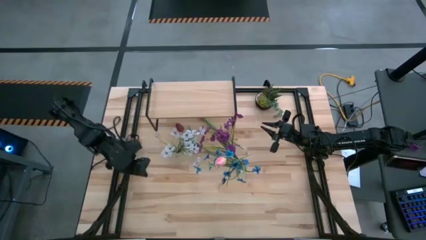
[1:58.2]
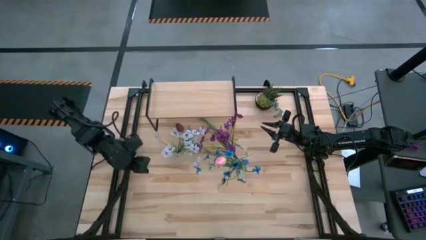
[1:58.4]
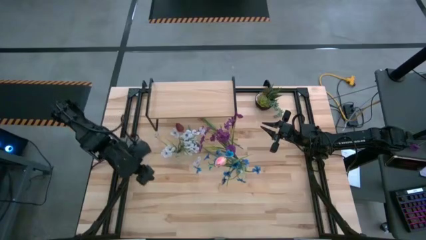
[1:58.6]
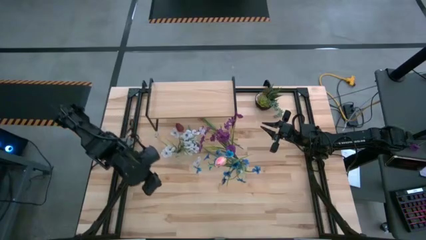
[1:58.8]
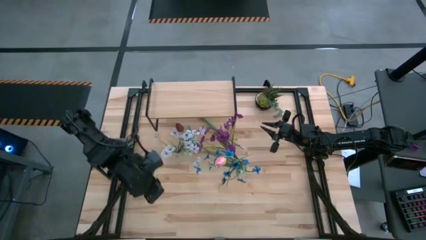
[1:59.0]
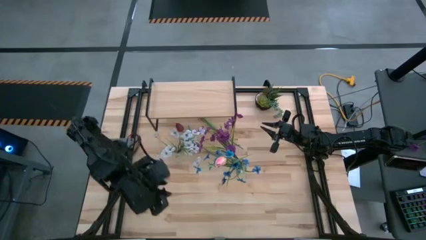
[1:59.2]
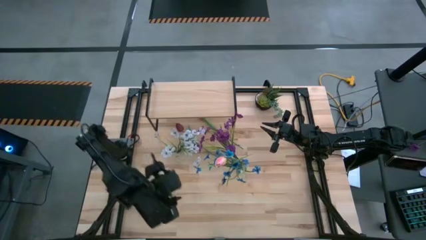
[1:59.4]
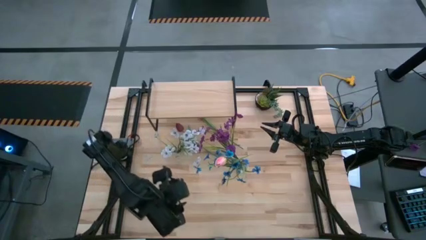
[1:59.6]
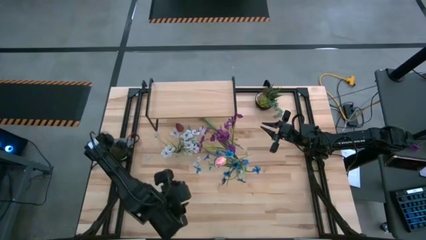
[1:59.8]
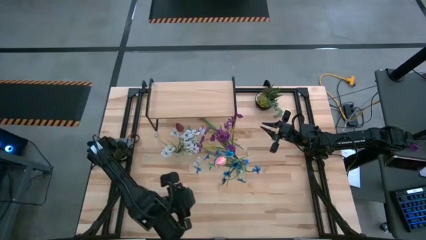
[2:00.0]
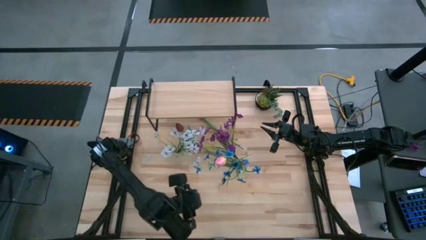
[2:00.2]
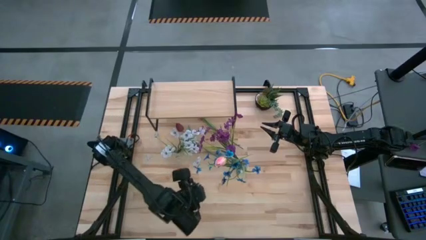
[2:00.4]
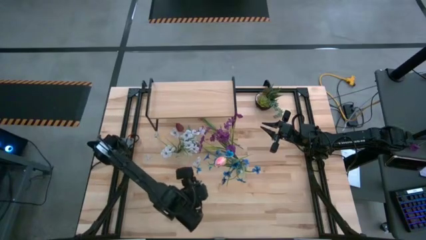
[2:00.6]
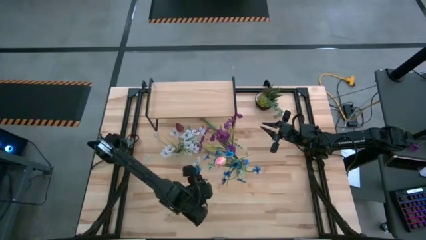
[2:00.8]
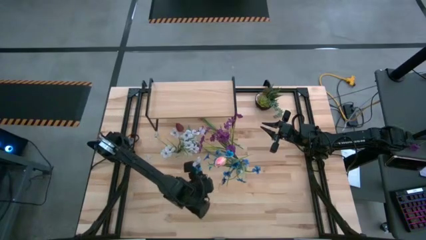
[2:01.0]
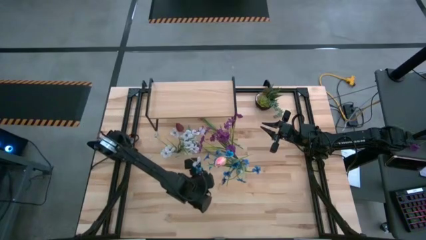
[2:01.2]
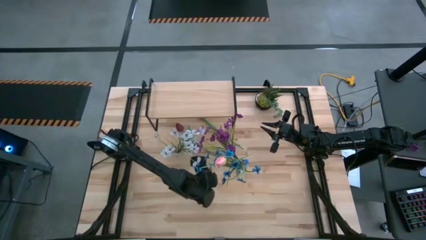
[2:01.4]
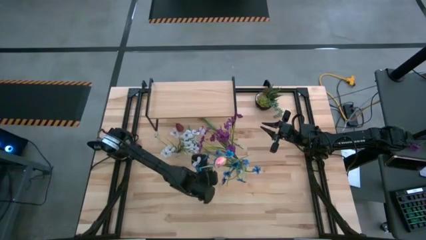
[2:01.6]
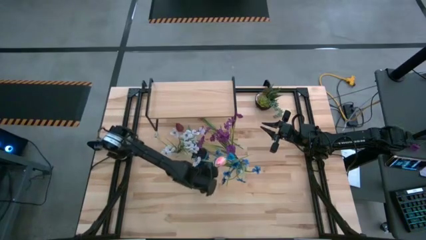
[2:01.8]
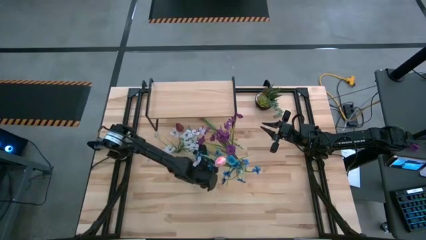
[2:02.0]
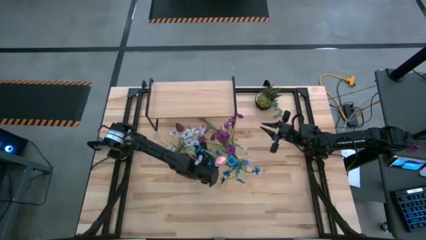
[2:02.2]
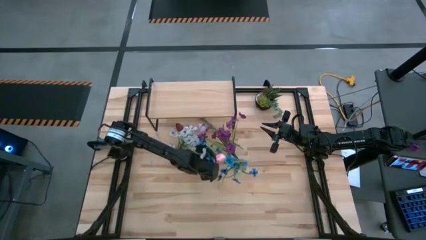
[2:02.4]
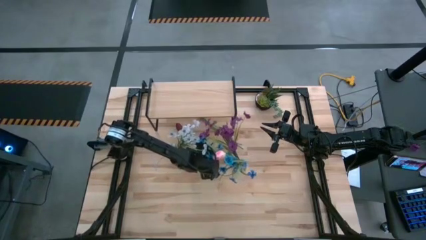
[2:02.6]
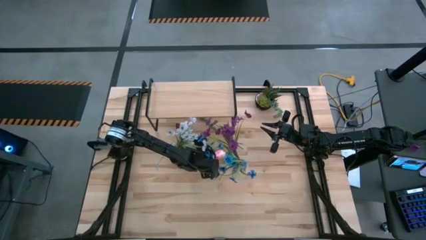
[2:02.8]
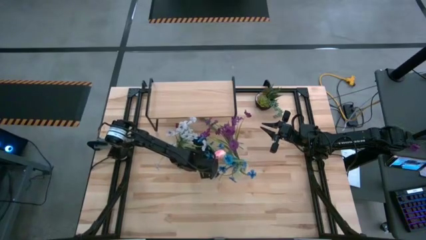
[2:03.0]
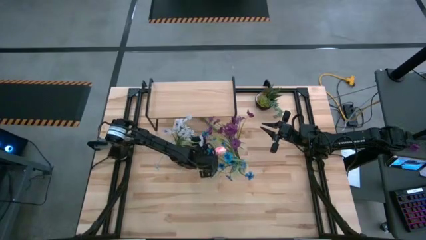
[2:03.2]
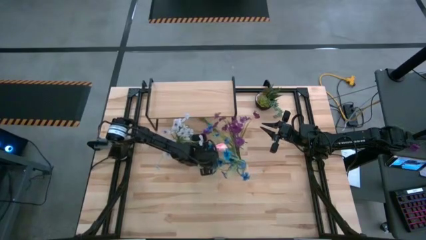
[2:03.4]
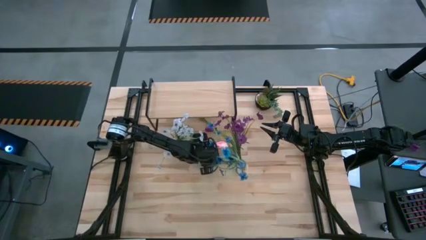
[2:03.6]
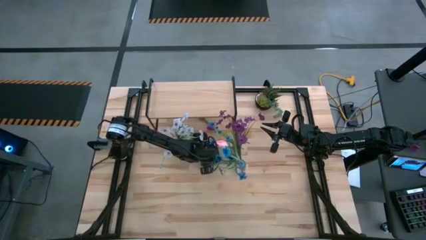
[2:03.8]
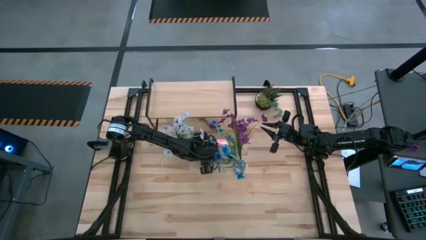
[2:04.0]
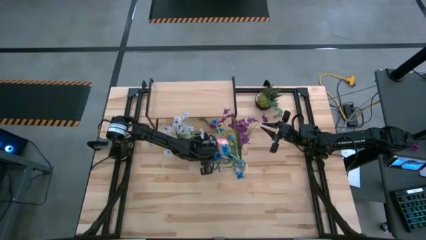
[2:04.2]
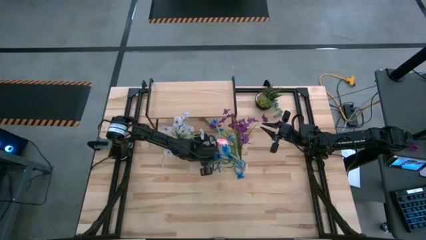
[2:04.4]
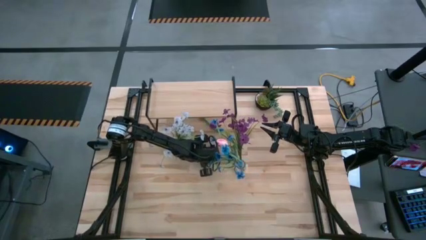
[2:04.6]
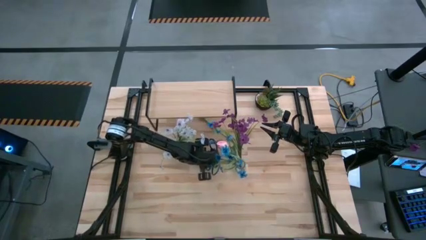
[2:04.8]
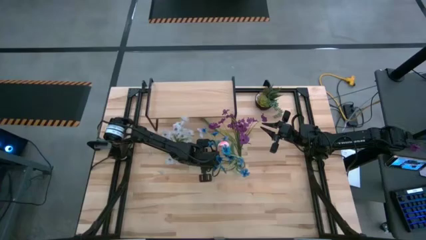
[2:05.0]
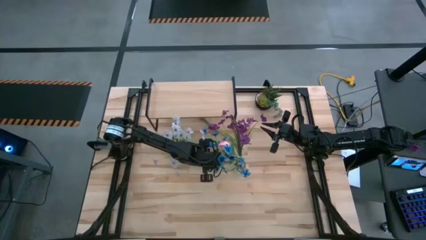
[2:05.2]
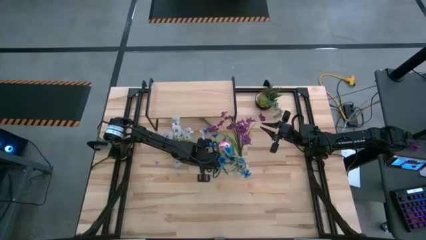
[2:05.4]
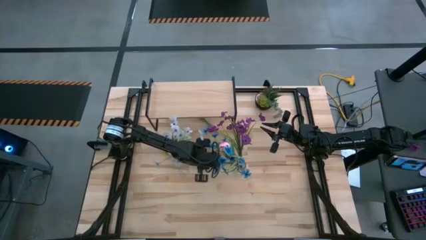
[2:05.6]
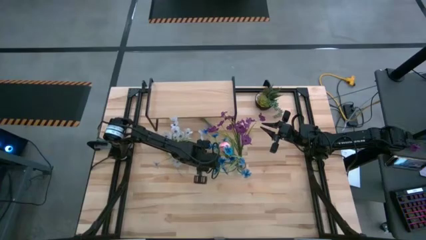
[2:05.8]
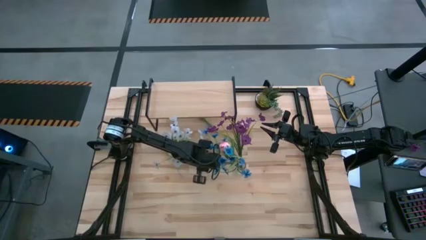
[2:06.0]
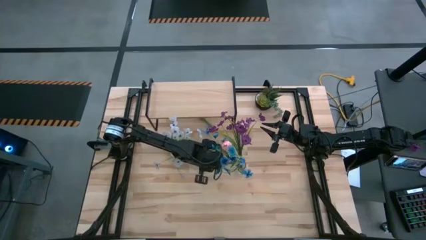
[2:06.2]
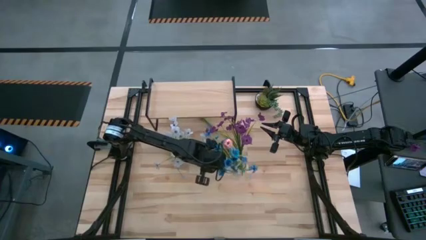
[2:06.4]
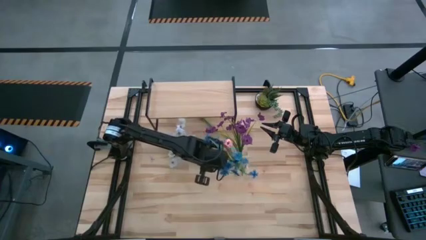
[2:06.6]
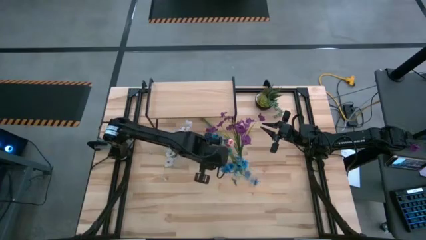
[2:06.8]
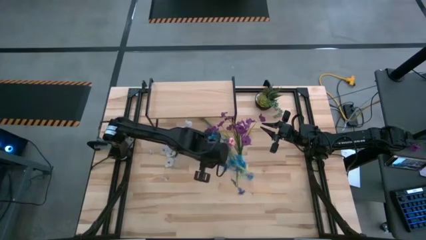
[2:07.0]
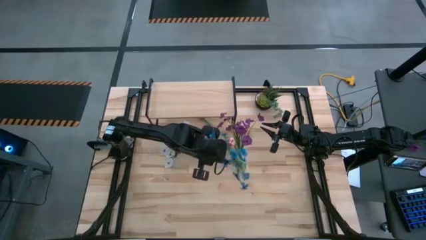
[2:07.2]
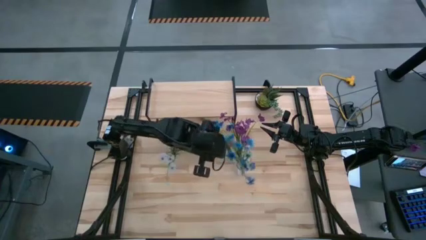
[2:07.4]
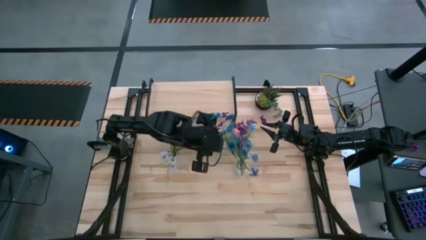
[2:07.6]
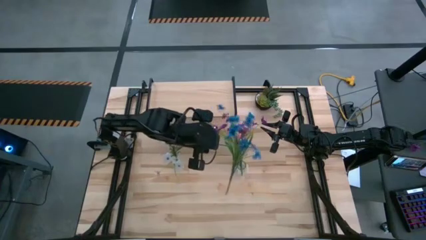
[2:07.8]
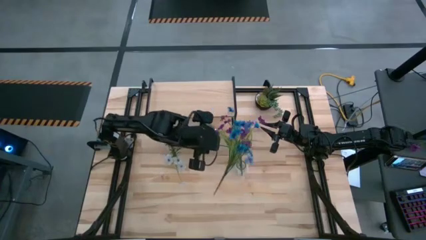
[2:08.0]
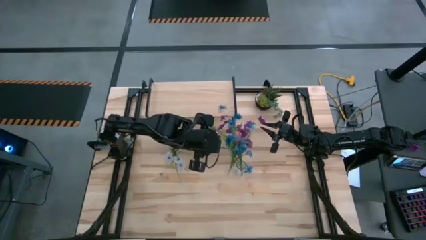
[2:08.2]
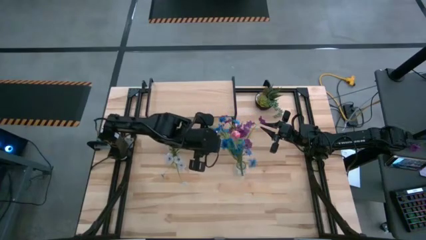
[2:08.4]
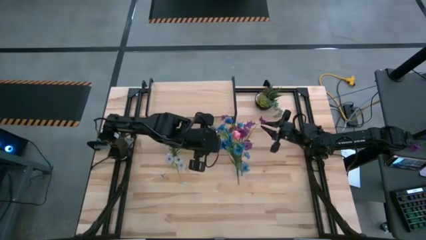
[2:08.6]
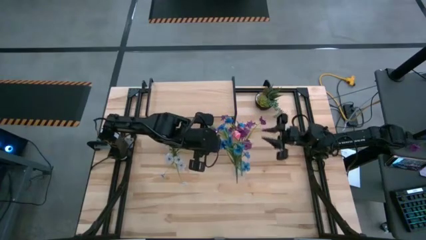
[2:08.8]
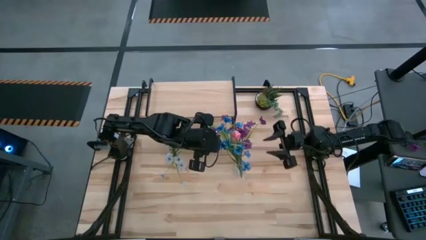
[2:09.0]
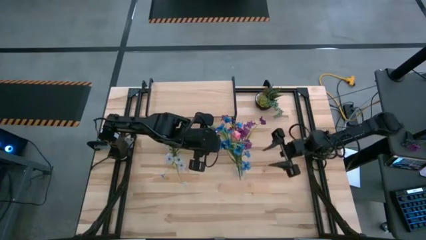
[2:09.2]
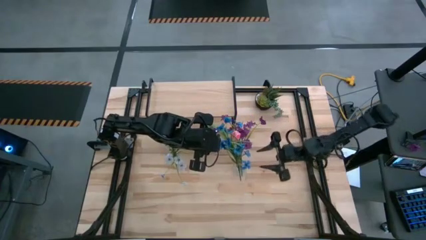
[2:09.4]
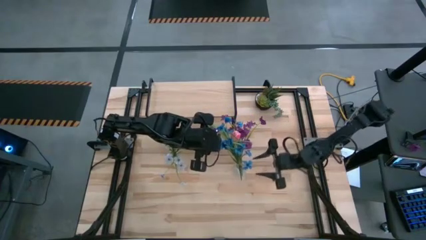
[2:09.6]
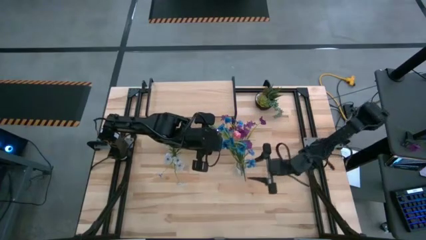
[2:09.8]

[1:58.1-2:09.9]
Task: Pick and place flowers into a vace then onto a shelf
Put the red flower into the right transparent vase

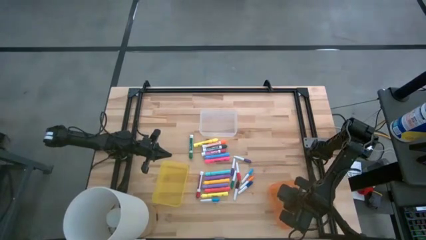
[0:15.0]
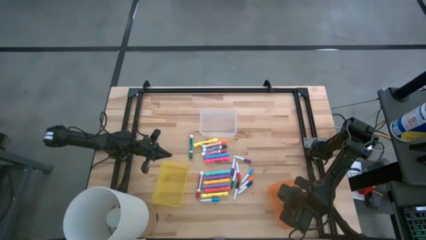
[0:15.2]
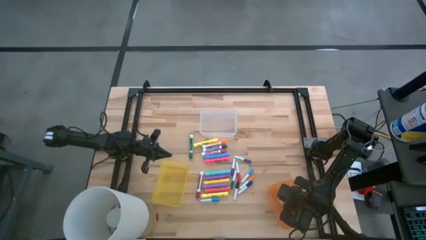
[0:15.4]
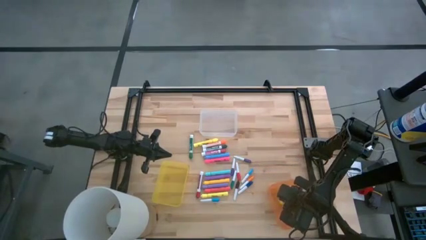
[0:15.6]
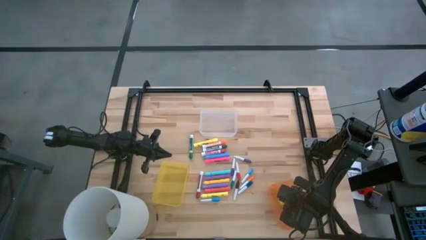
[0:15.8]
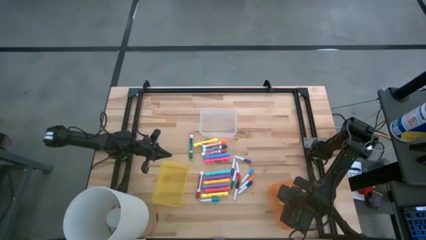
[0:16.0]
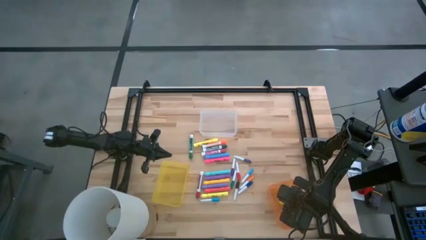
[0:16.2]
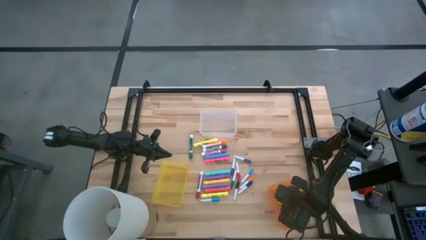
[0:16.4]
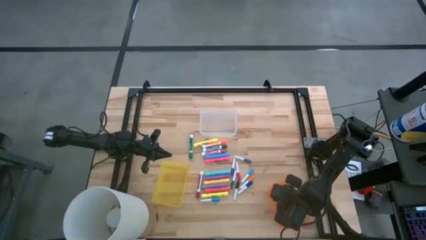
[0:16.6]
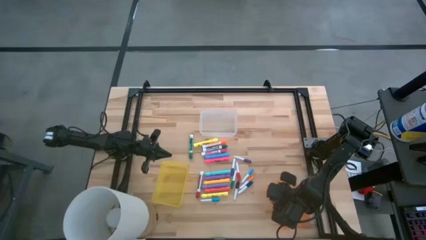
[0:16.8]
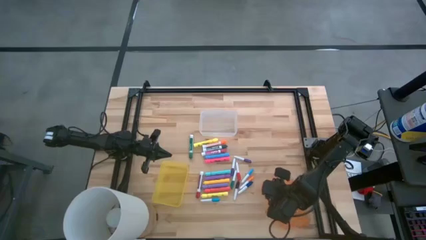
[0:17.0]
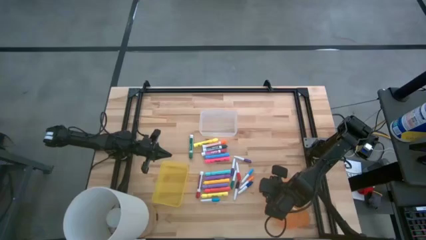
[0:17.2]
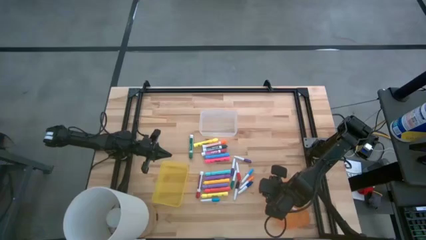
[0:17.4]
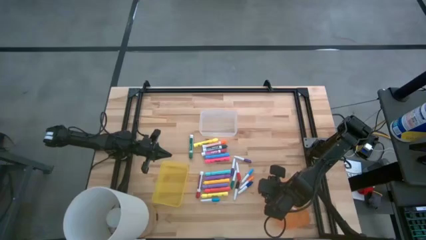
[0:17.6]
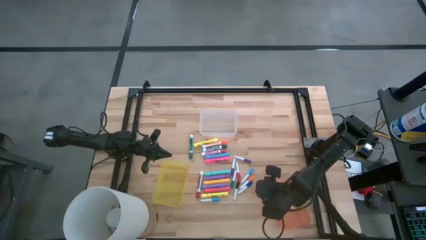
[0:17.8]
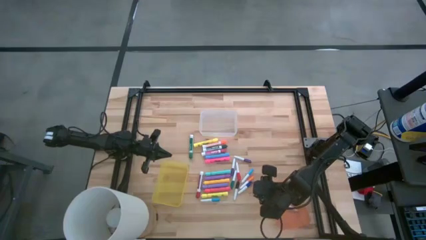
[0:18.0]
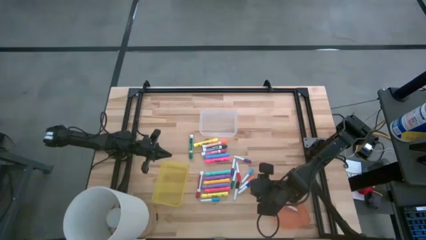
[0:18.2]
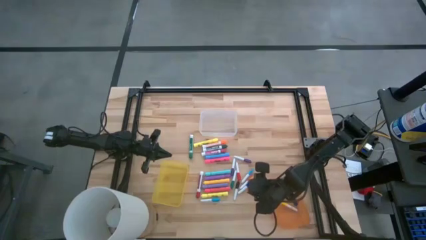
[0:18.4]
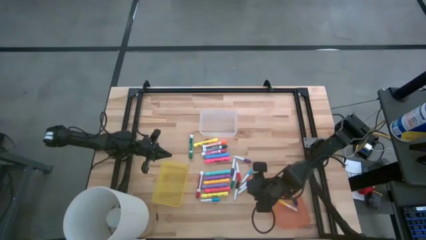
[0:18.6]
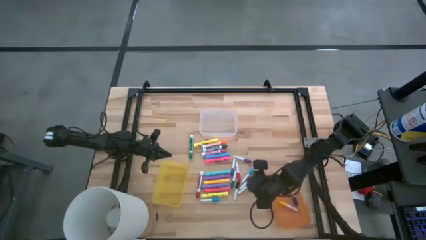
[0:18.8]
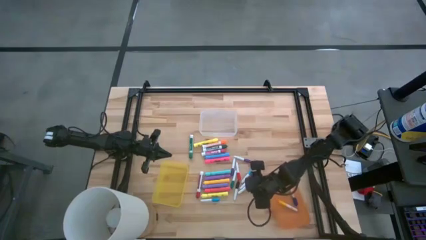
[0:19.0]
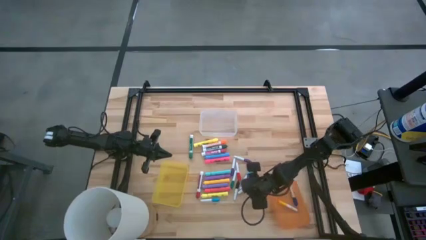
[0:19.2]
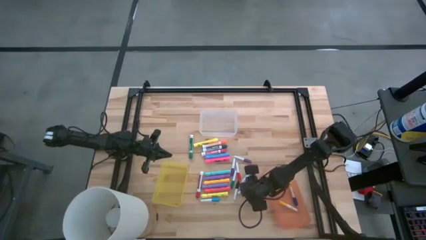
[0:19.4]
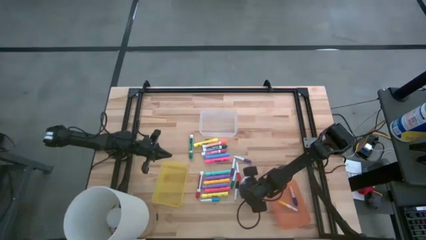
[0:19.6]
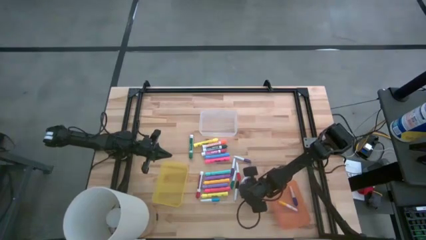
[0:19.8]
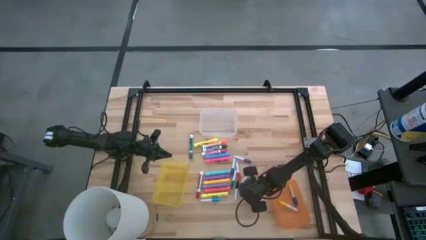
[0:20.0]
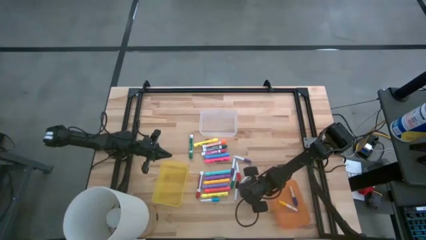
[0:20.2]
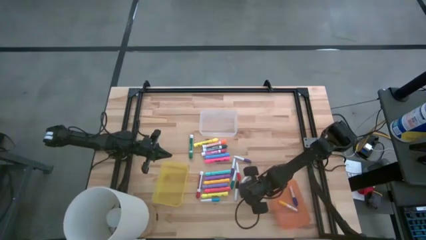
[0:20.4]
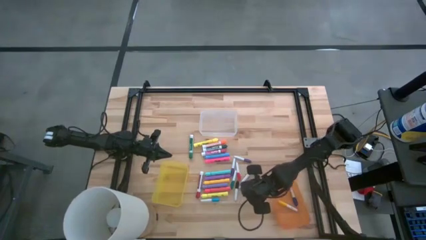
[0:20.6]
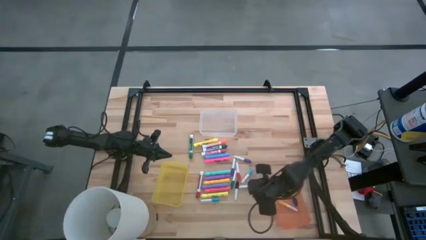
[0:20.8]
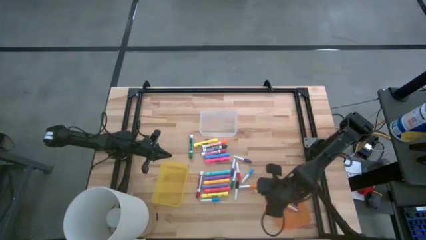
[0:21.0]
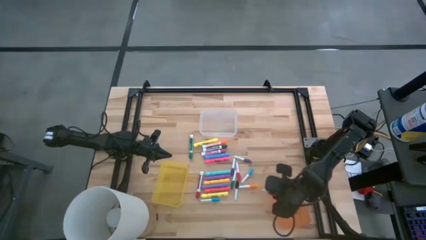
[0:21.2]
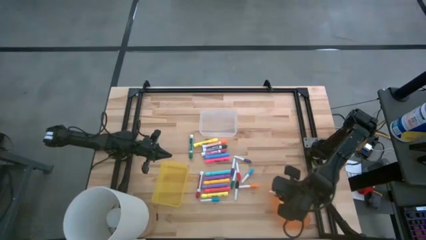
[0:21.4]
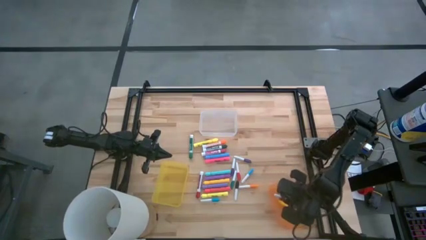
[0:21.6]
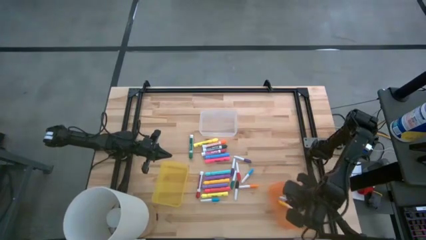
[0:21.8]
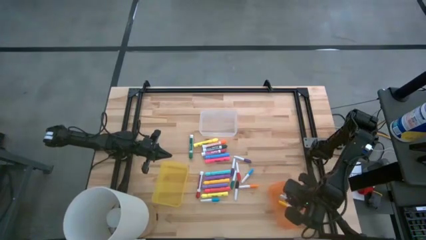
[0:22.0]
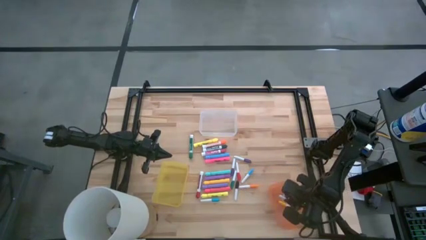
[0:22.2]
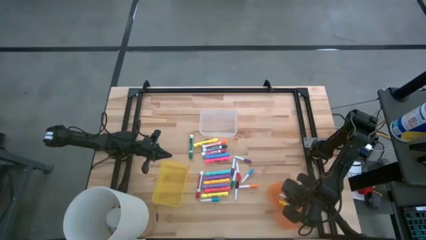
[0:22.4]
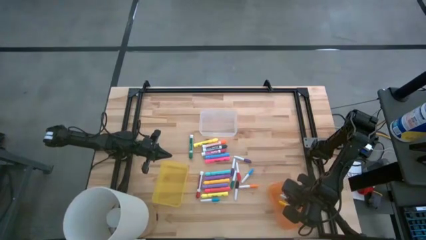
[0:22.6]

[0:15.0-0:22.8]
Task: Pick & Place Markers
Put the small dark blue highlighter pen into the orange bin
